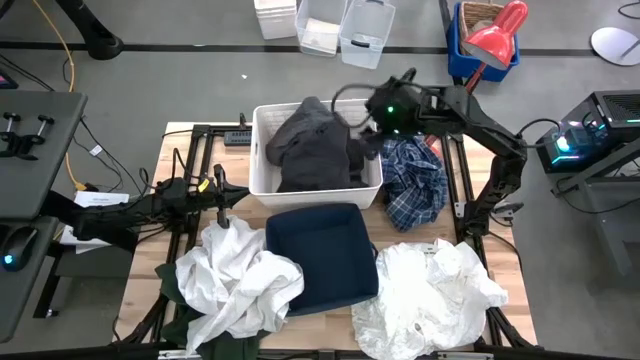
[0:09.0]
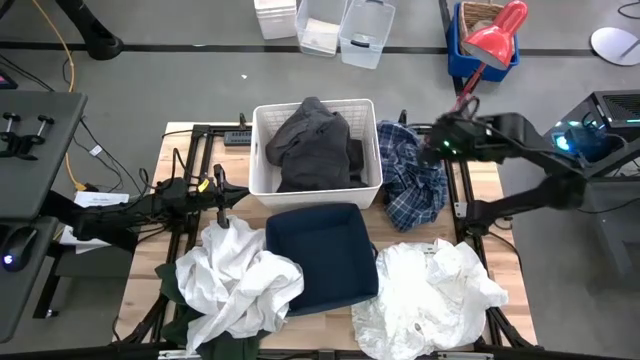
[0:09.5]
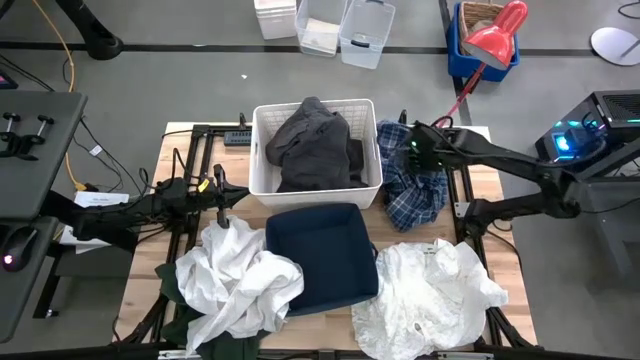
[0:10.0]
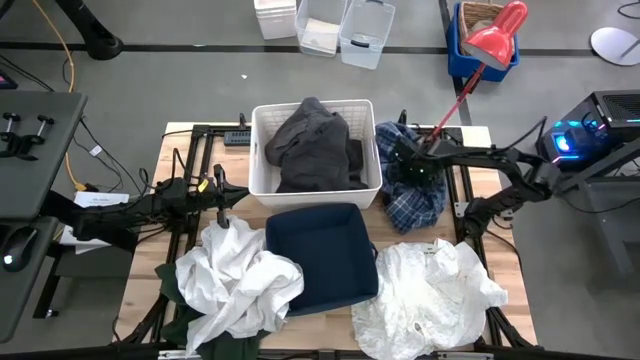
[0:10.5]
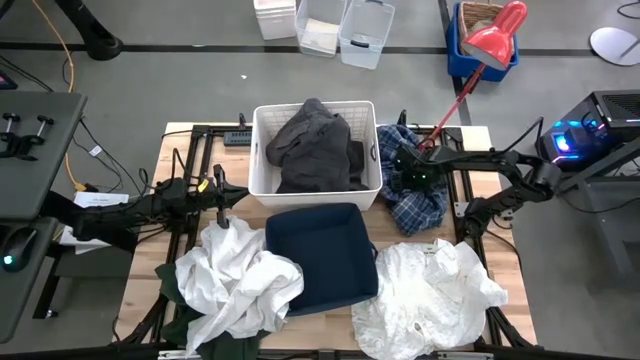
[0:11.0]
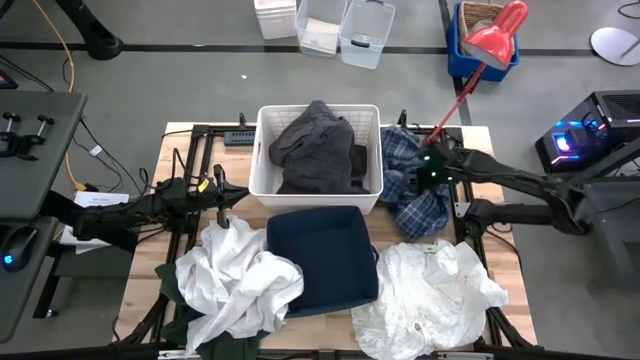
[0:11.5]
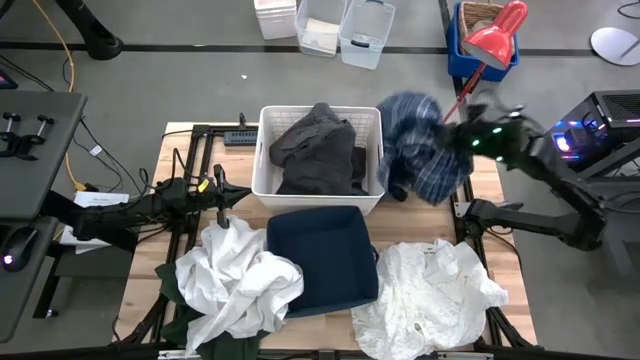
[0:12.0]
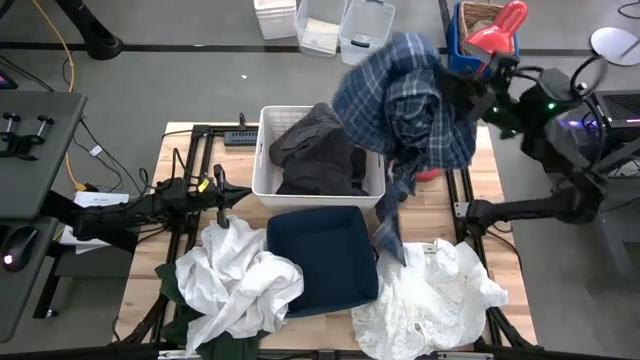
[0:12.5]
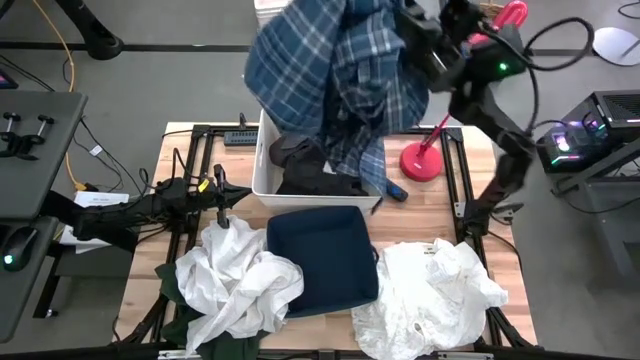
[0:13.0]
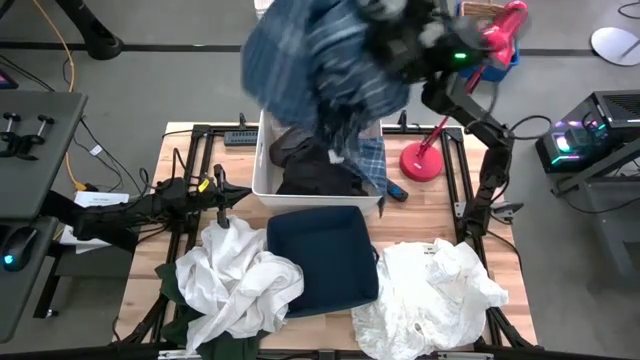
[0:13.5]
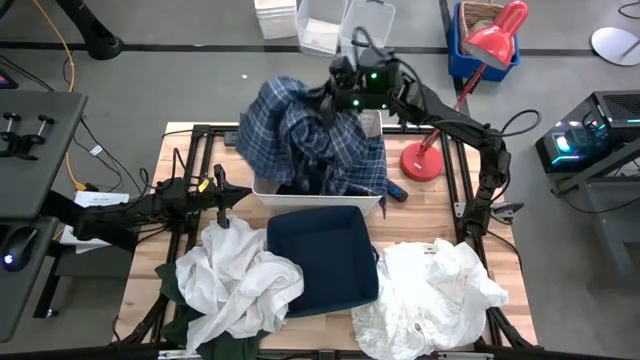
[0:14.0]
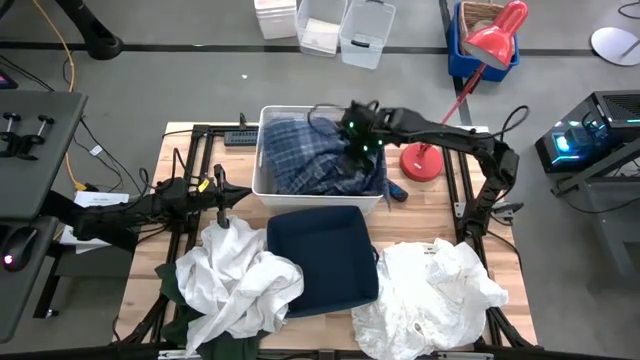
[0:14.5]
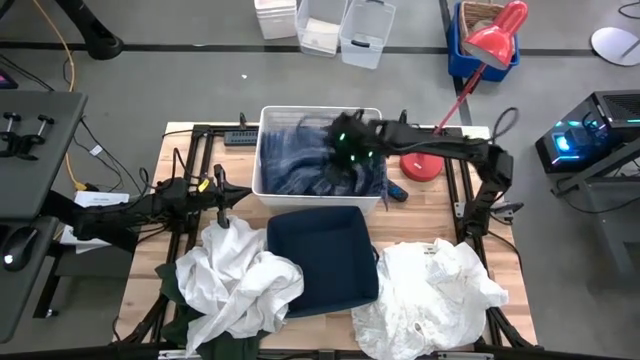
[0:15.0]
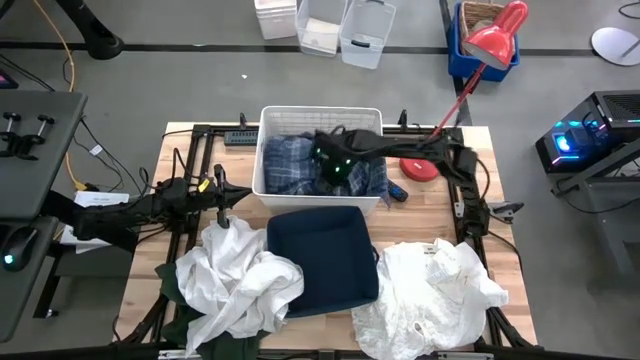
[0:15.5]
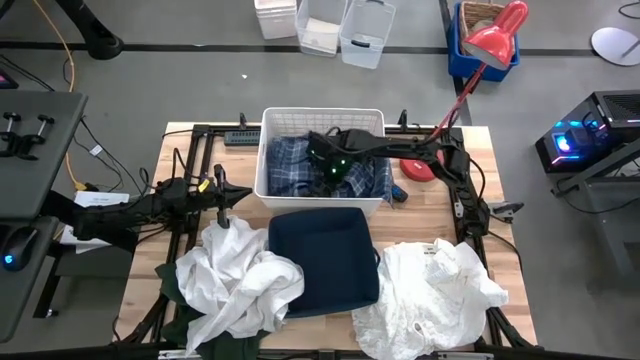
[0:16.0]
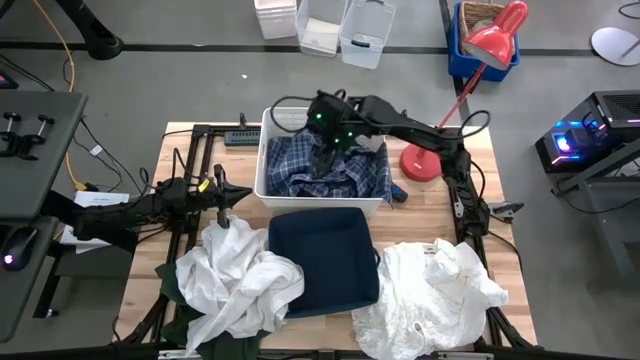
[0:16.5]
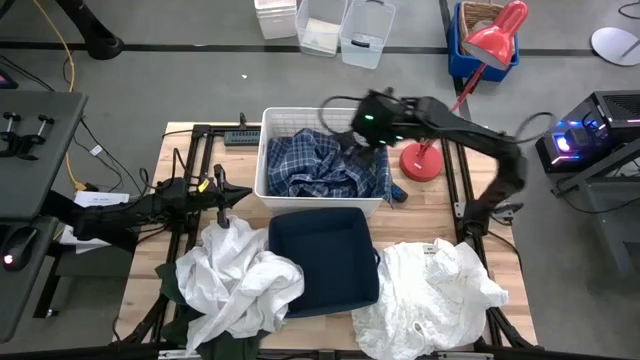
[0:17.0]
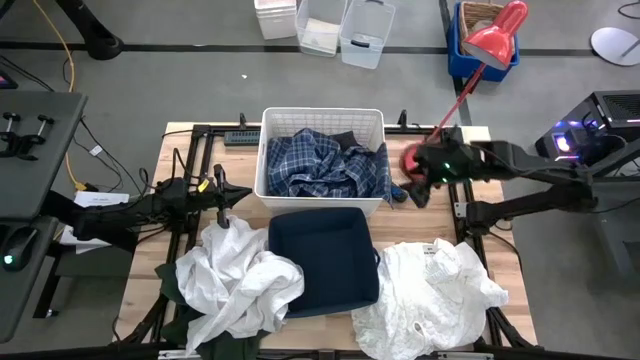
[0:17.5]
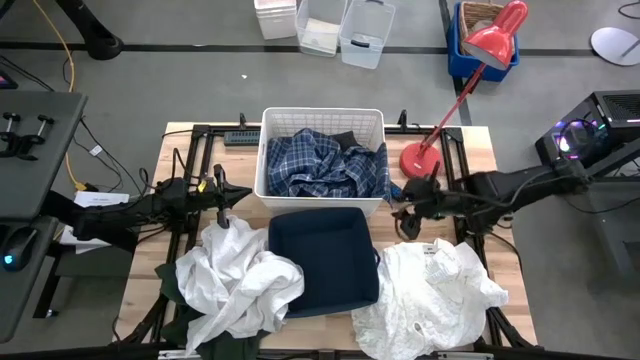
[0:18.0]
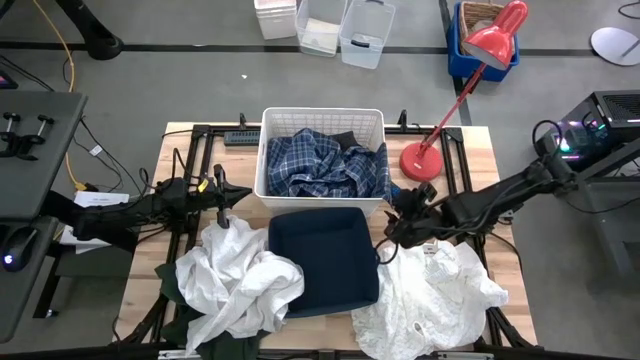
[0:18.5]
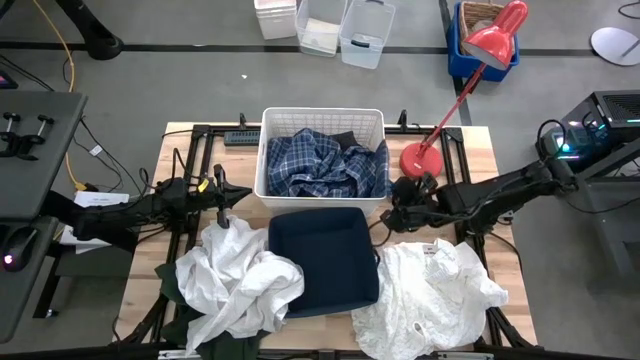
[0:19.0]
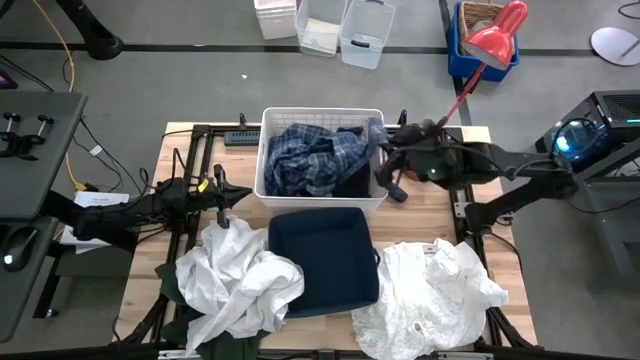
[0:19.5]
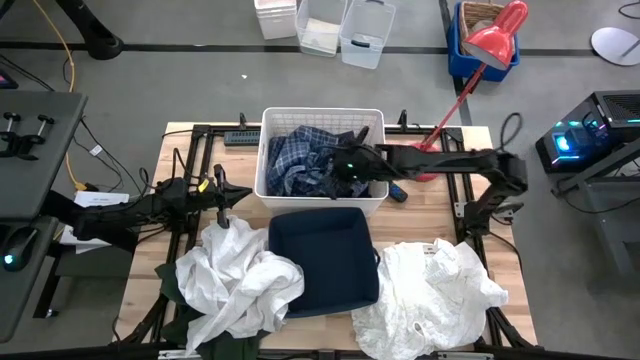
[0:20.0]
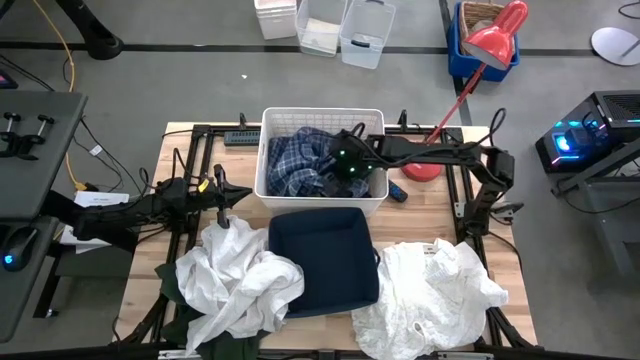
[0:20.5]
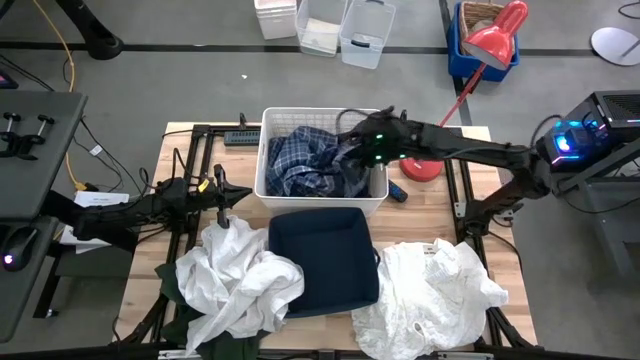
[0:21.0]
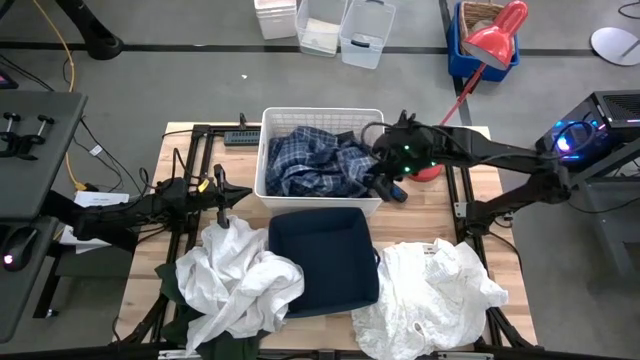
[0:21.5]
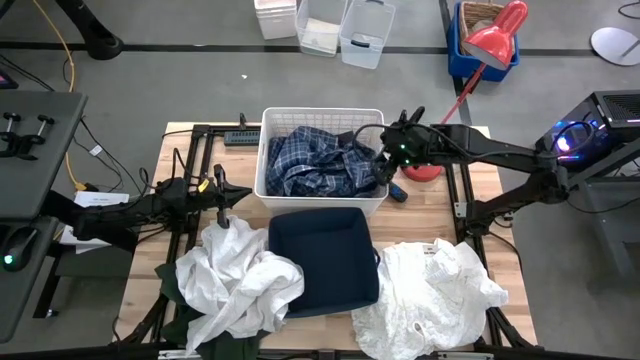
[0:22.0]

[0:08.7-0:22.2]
Task: Sort clothes
Put the blue polo shirt into the white laundry bin

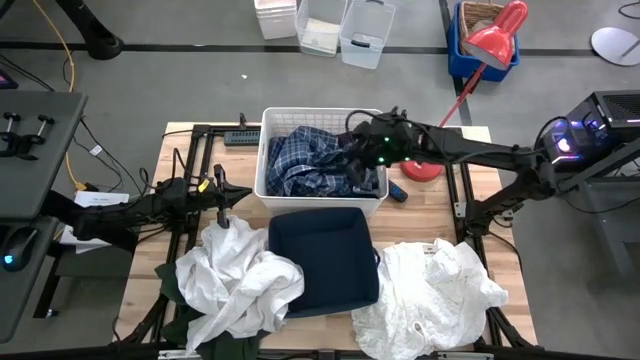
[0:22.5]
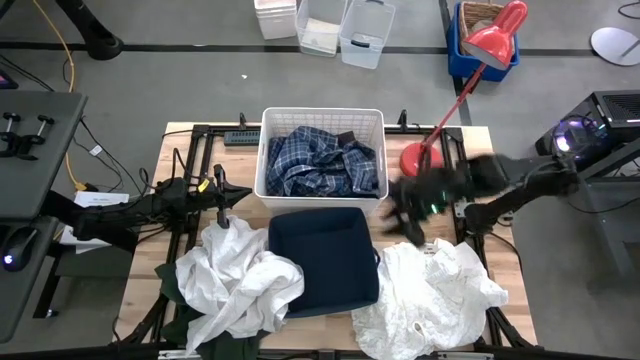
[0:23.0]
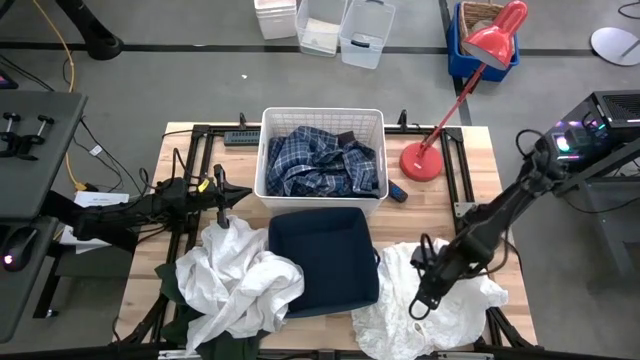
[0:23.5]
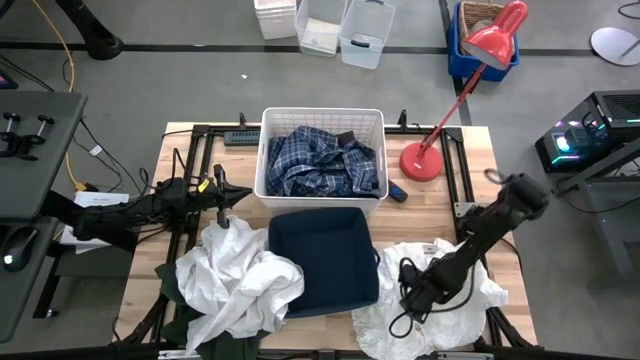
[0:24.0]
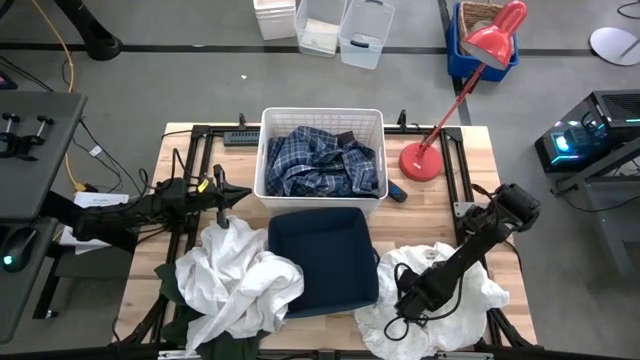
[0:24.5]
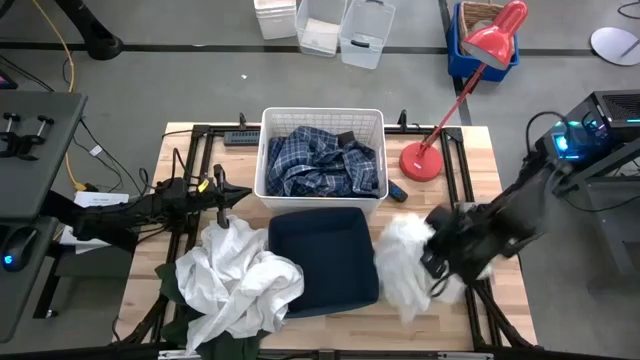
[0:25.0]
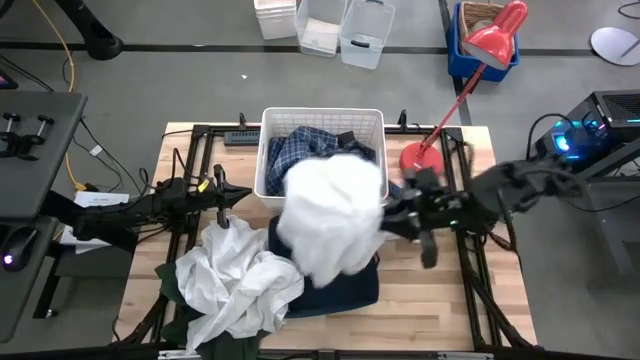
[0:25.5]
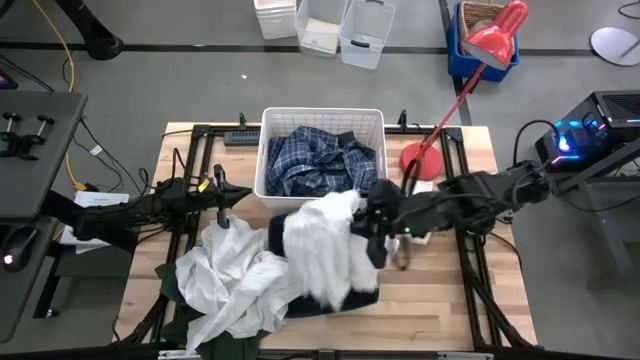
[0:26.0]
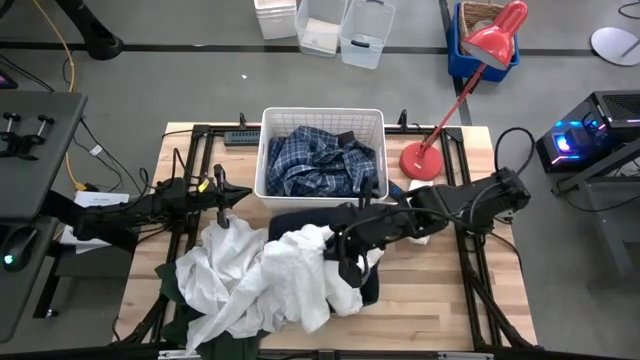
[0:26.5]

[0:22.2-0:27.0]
Put the white dress into the blue laundry bin

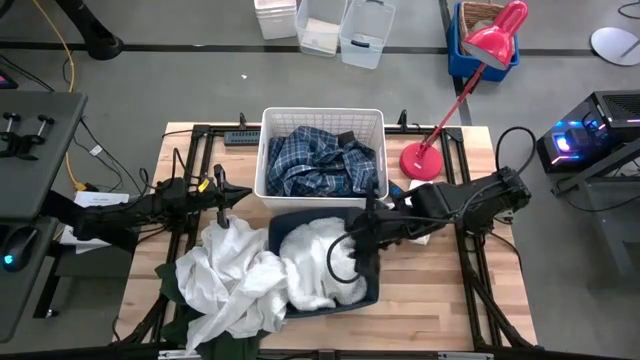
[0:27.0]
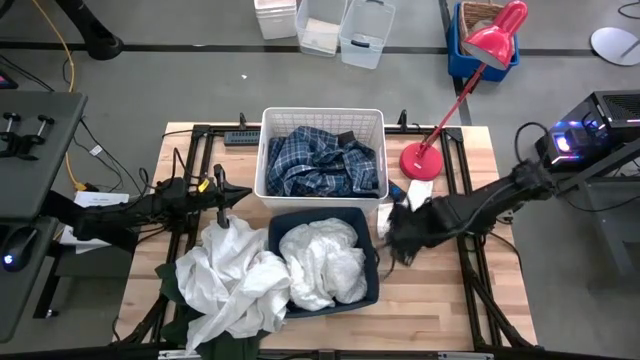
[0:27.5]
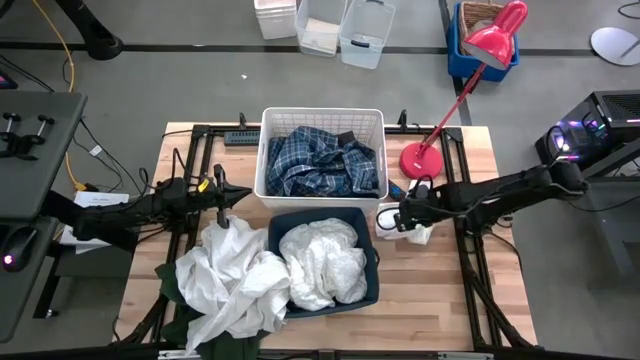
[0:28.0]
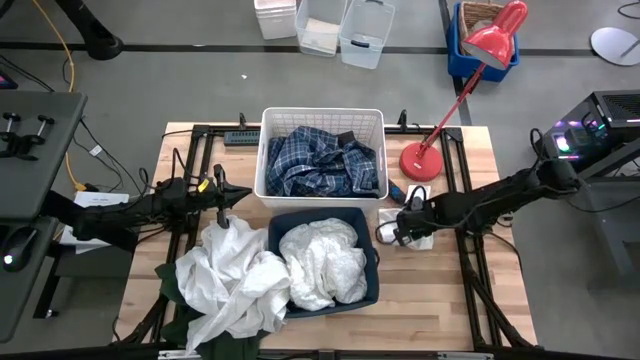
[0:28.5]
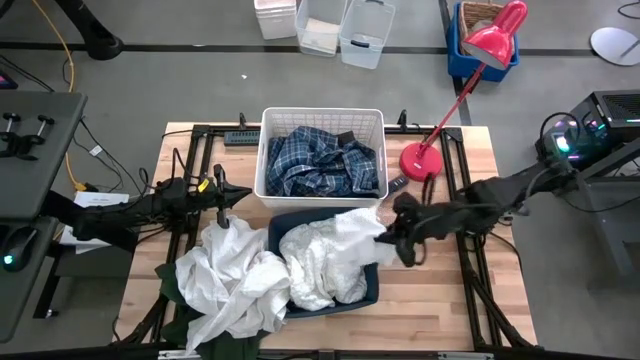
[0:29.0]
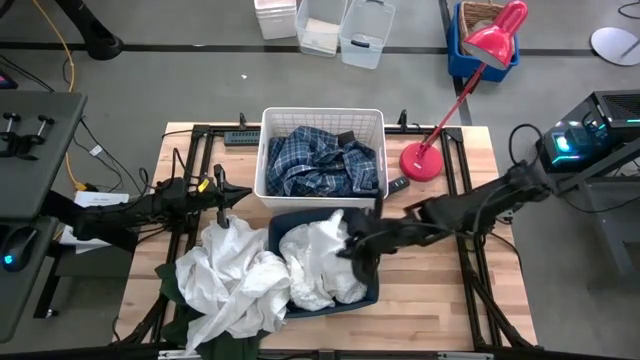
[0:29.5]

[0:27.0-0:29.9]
Put the white shorts into the blue laundry bin
